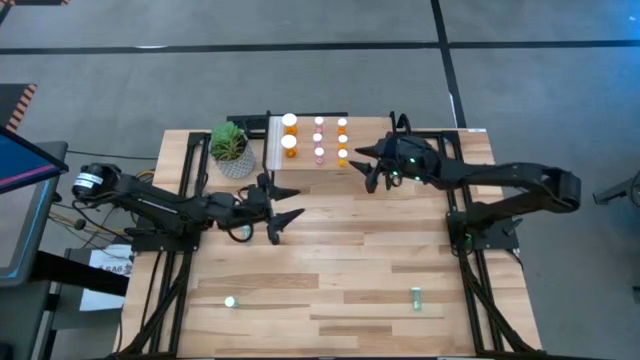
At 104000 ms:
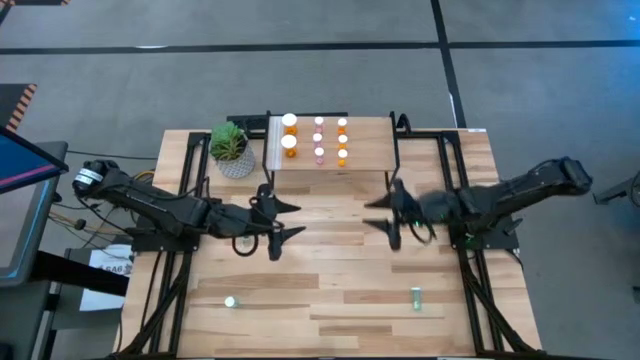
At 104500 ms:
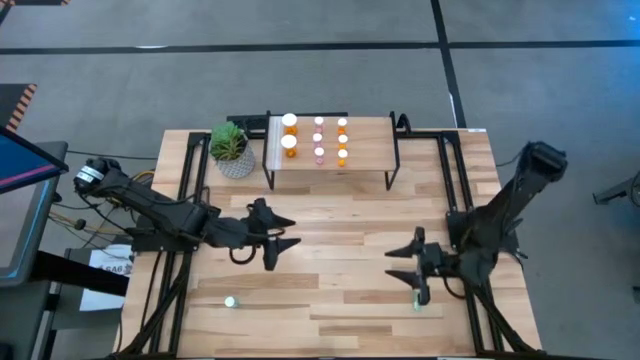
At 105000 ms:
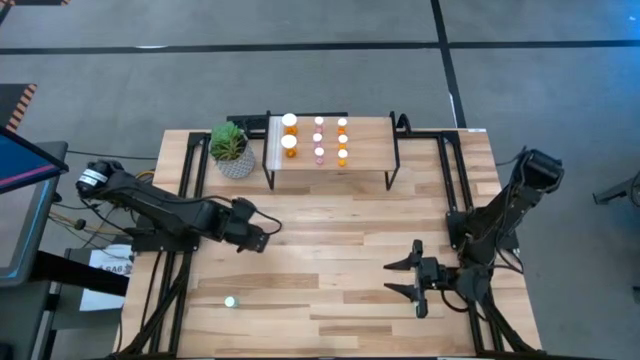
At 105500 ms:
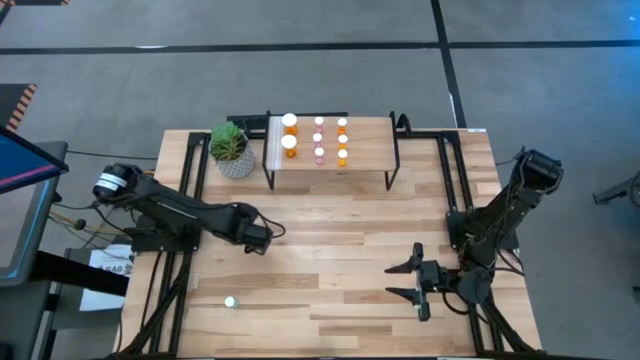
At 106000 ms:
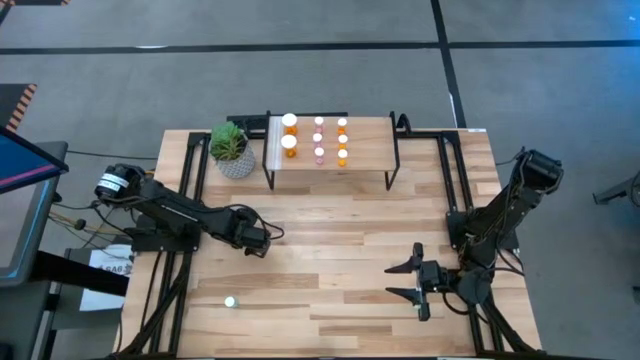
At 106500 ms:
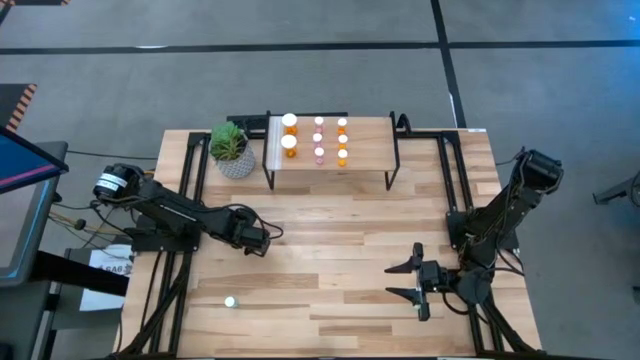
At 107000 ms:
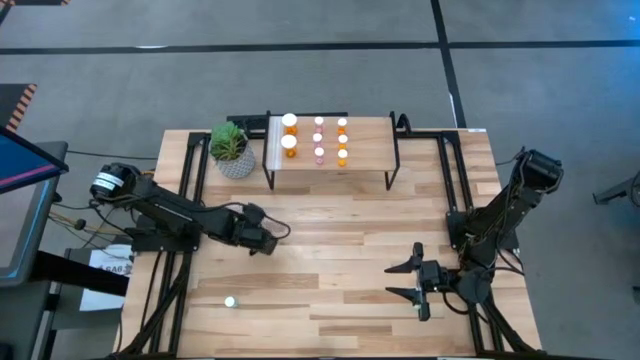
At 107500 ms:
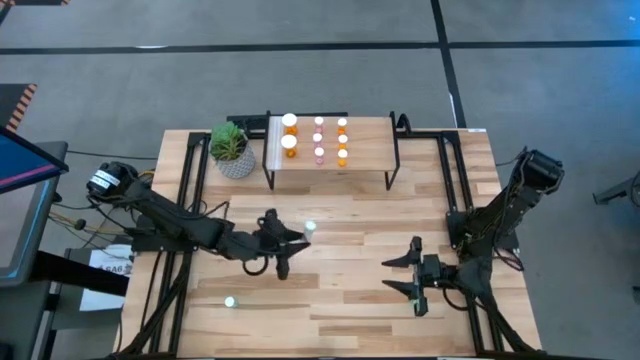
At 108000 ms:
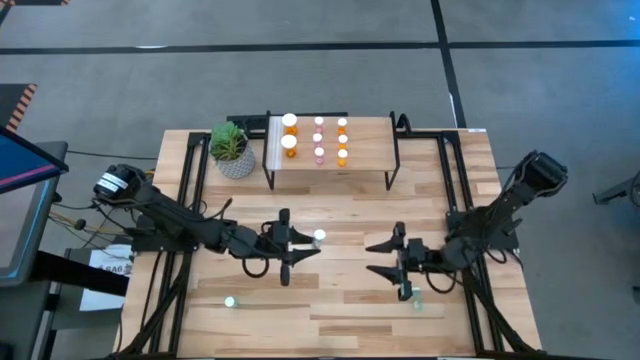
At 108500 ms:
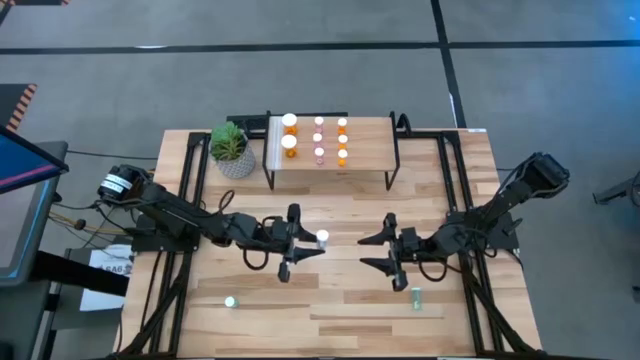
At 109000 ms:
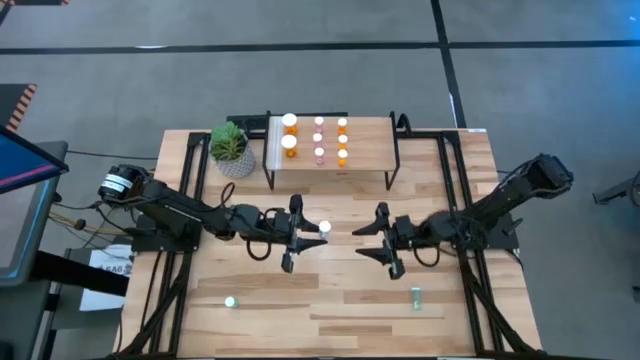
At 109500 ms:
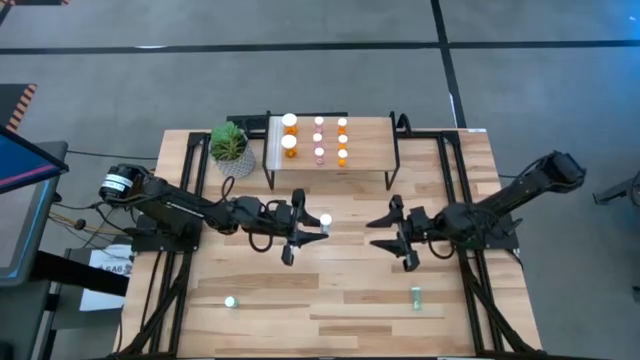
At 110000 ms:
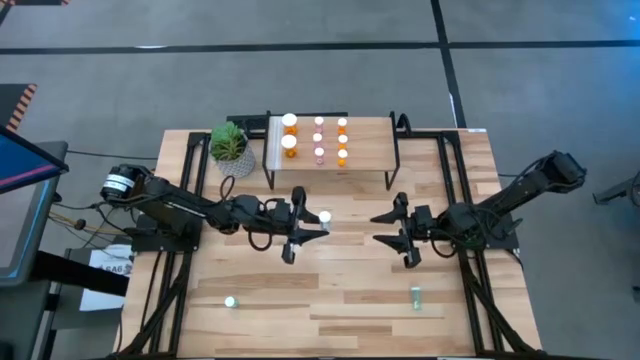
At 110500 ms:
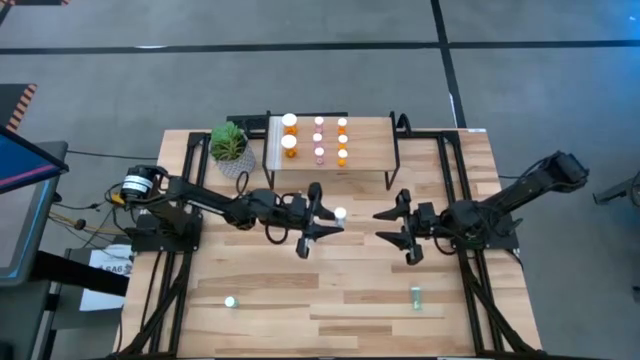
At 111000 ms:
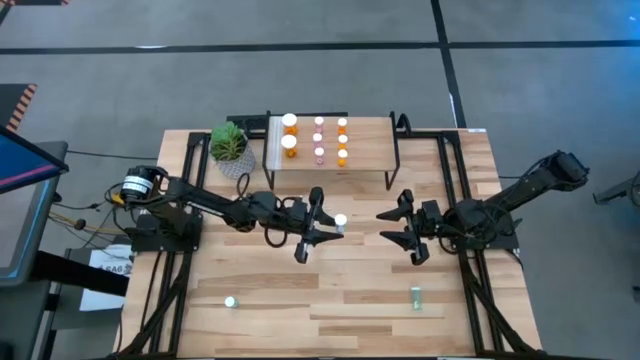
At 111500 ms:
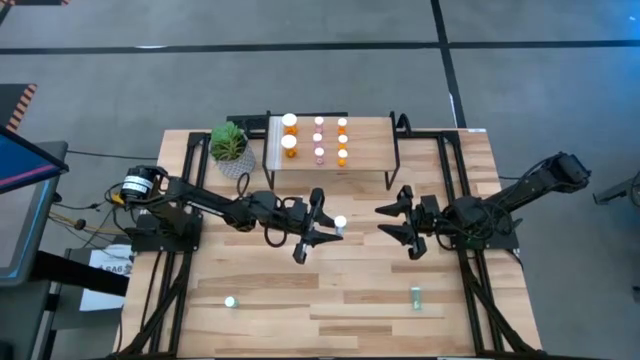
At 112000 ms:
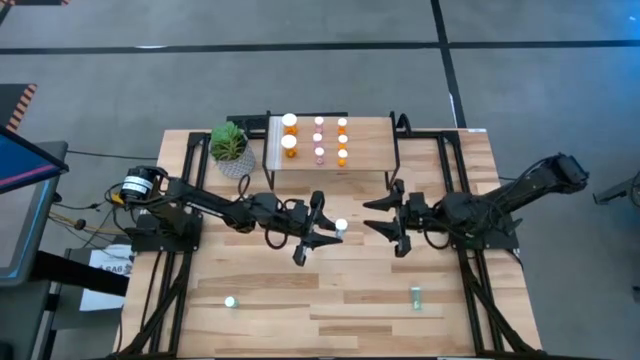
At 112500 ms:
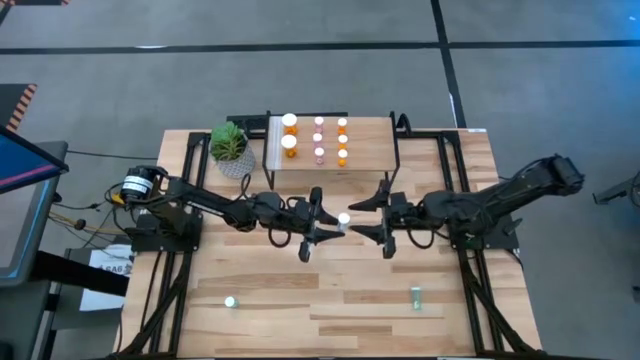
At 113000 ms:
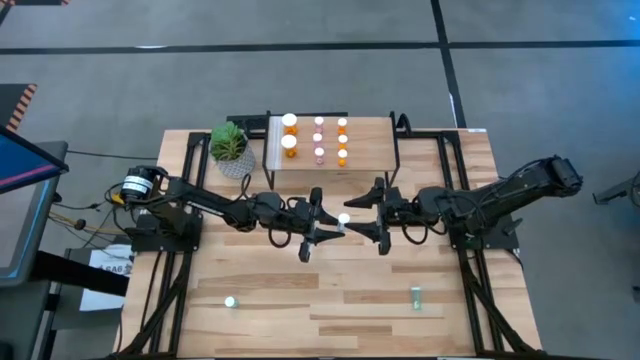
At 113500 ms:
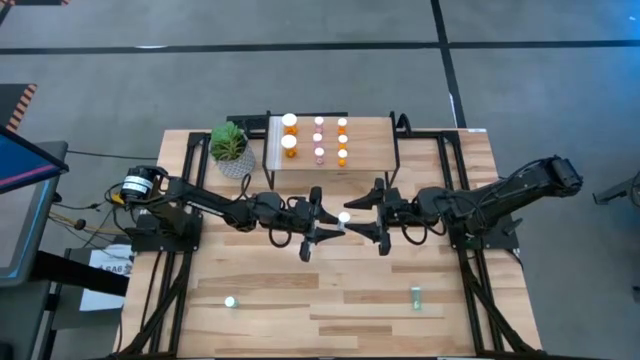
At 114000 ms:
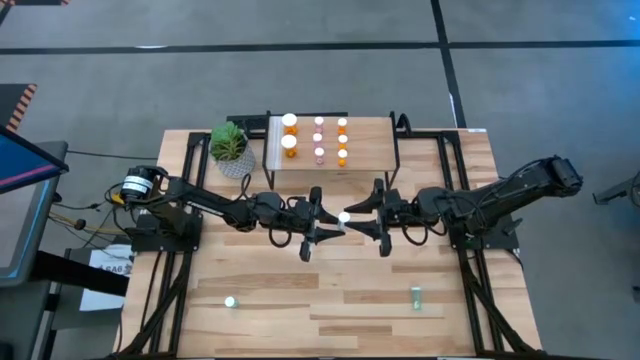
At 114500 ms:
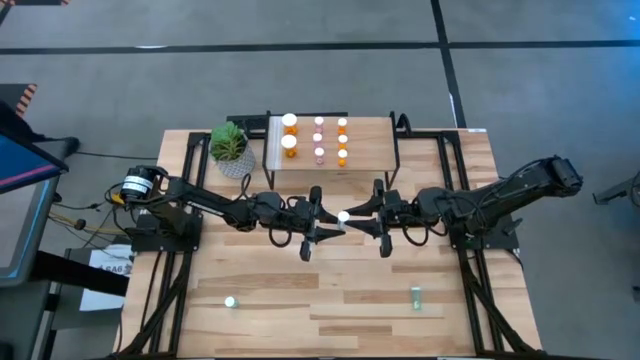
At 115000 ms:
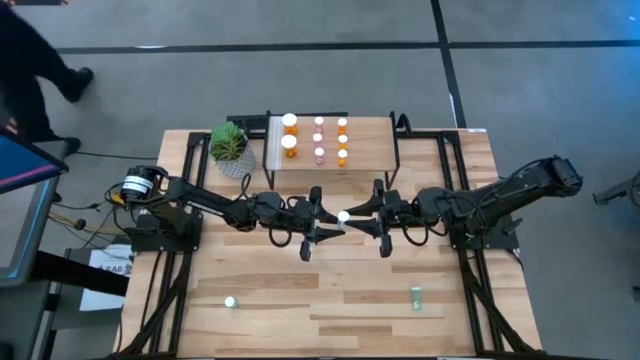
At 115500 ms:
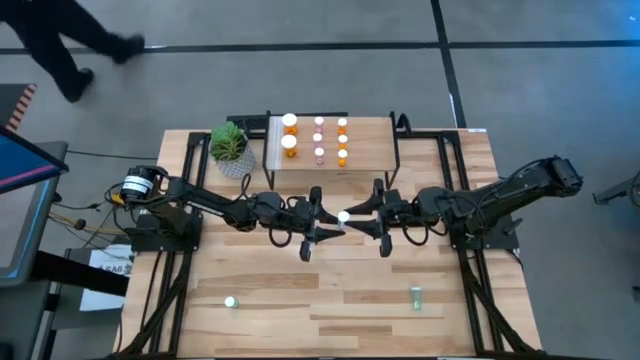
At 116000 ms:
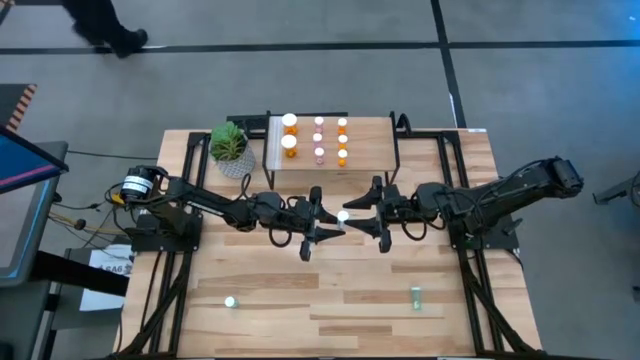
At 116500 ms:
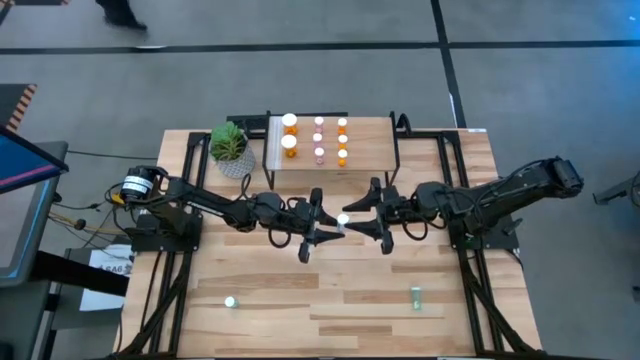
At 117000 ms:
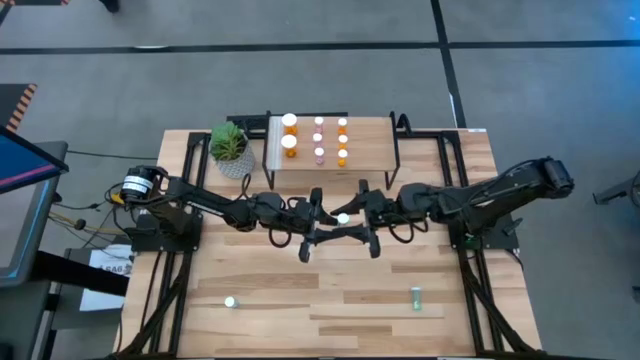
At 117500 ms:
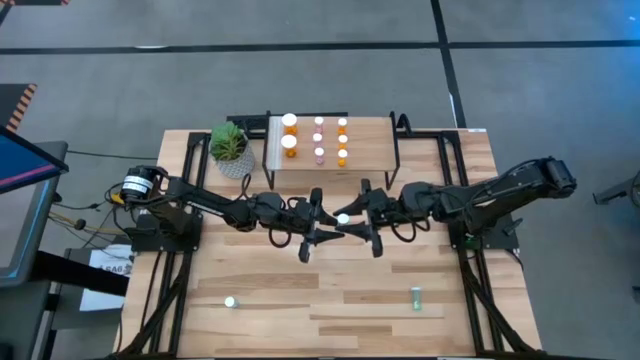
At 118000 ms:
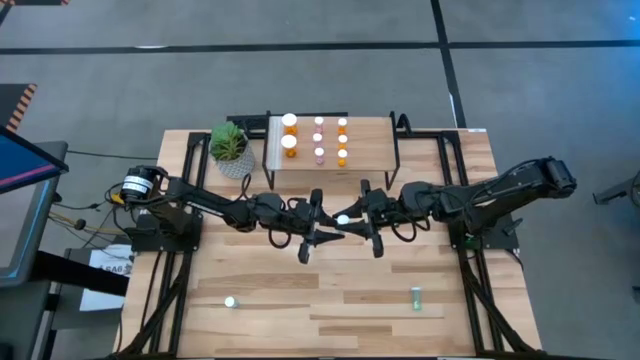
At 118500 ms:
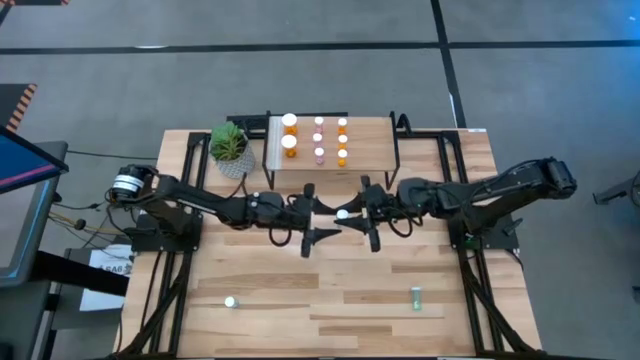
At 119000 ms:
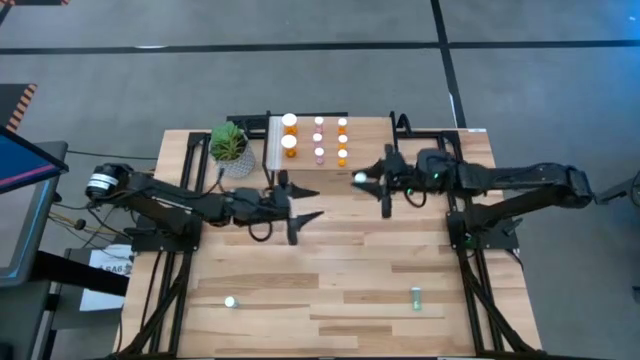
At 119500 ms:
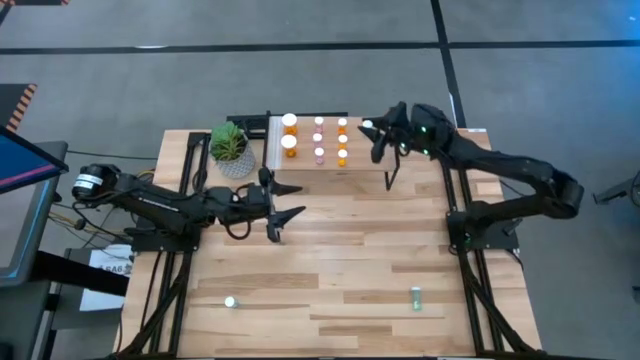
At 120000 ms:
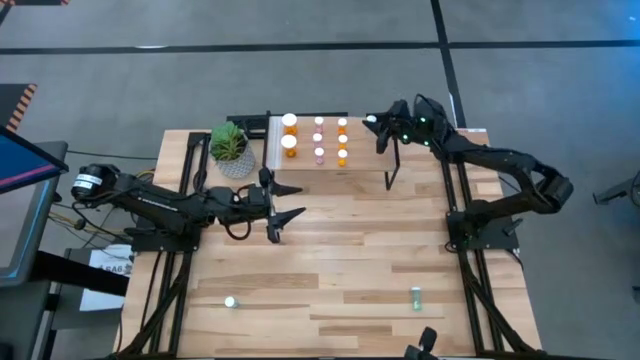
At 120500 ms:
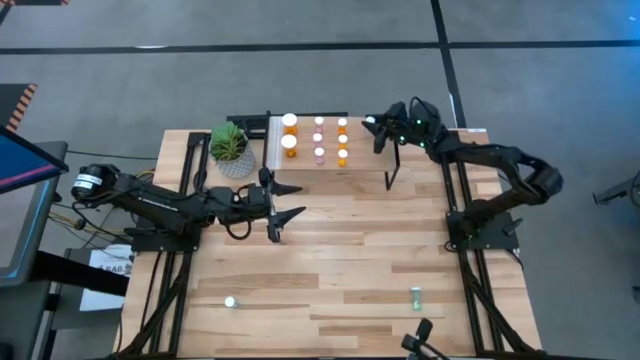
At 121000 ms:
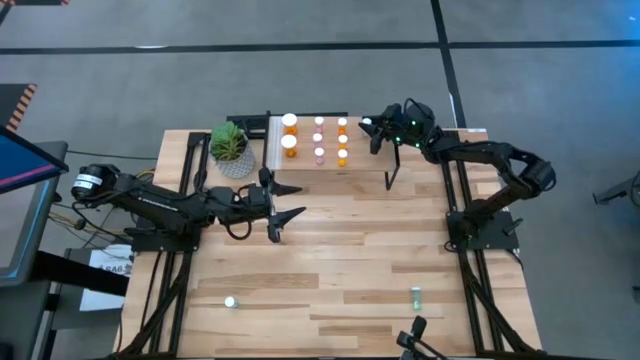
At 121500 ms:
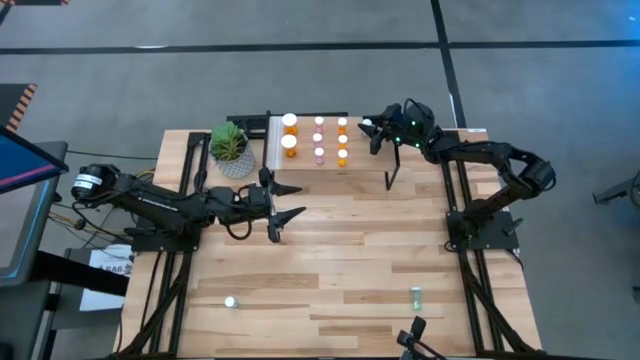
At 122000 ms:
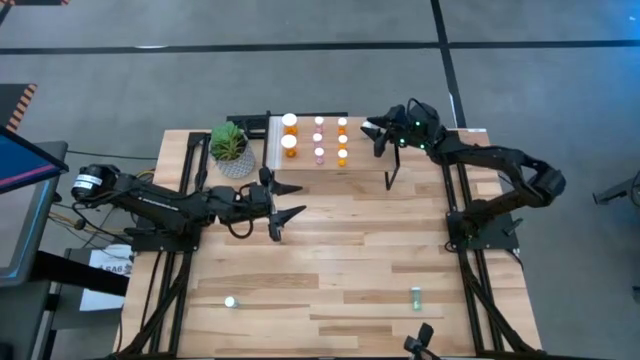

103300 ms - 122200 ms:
Task: Pick and place medicine bottles onto shelf by color
Put the top left blue pill bottle on the shelf

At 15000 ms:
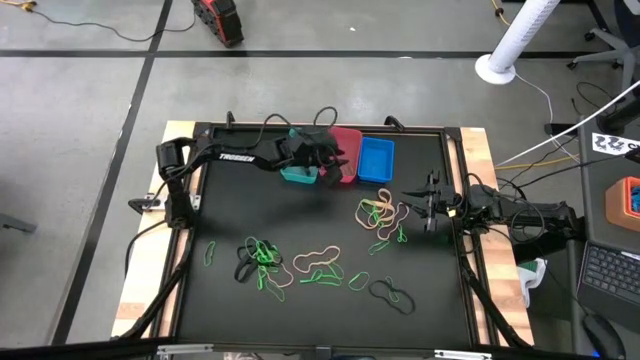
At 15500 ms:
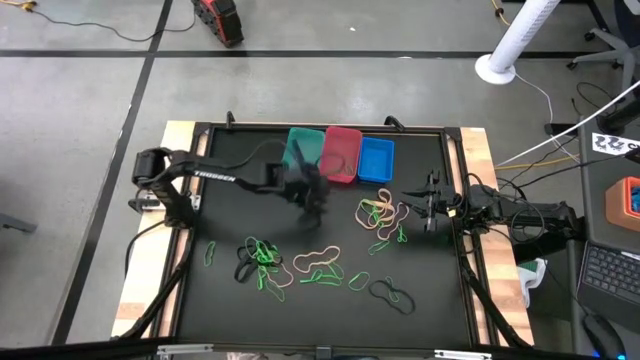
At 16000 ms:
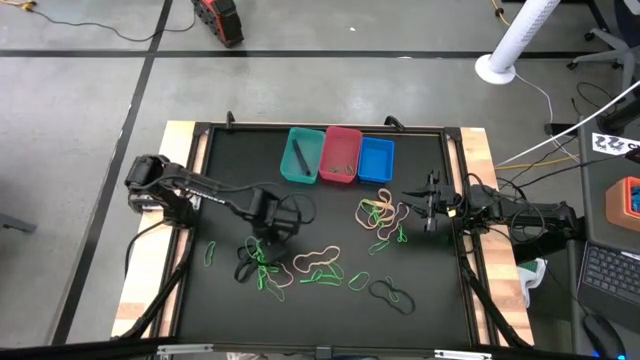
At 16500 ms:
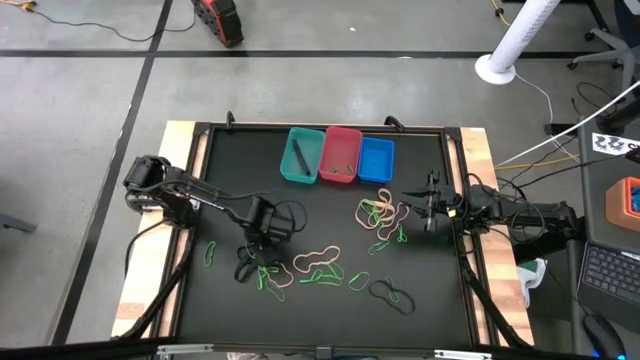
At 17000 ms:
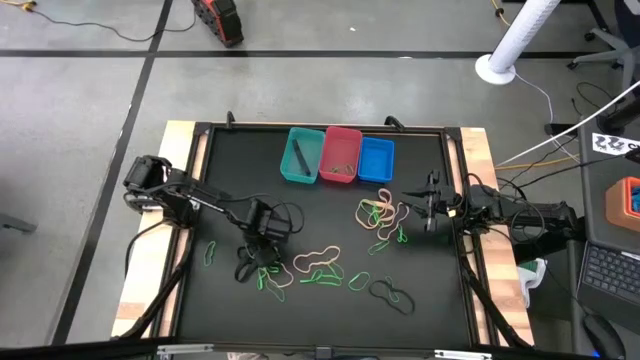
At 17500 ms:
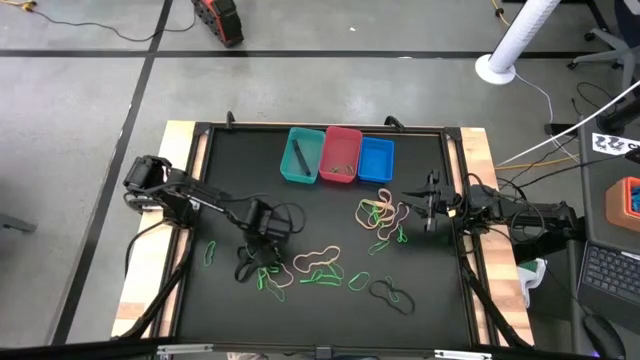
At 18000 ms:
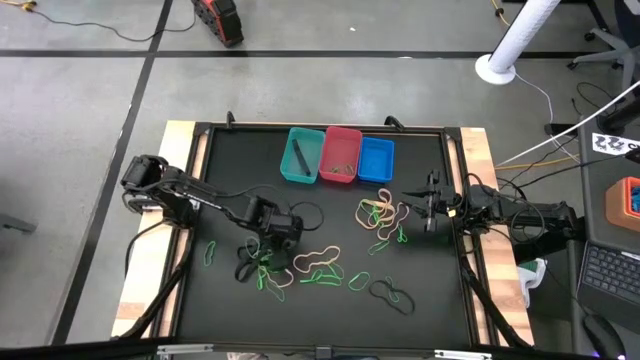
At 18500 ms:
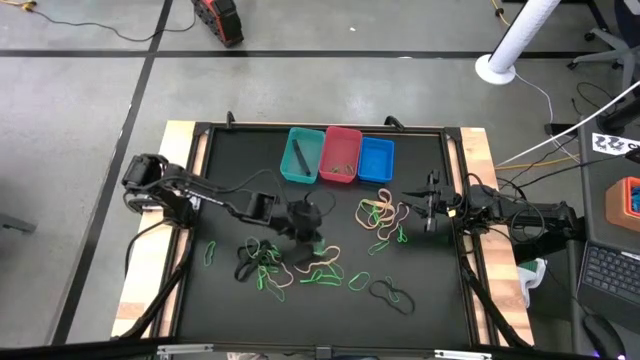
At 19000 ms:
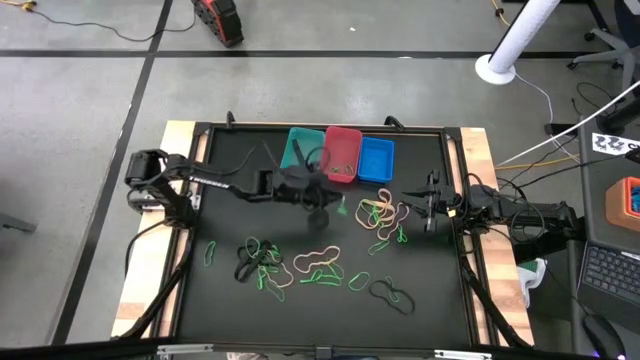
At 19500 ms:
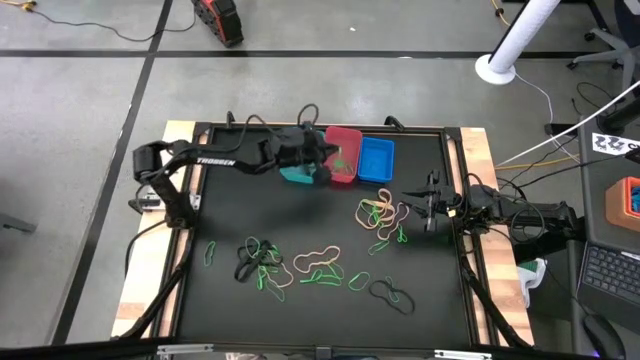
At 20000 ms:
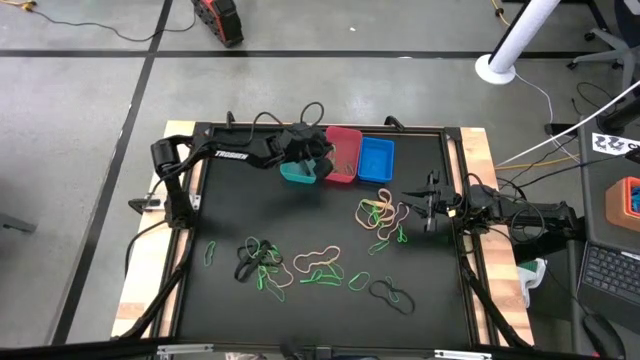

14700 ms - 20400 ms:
Task: Sort rubber bands into baskets
Put the green rubber band into the pink bin
